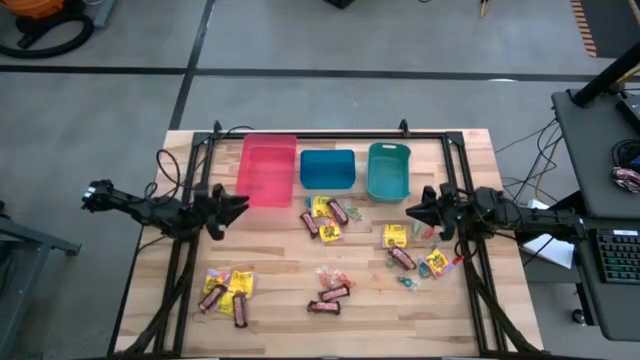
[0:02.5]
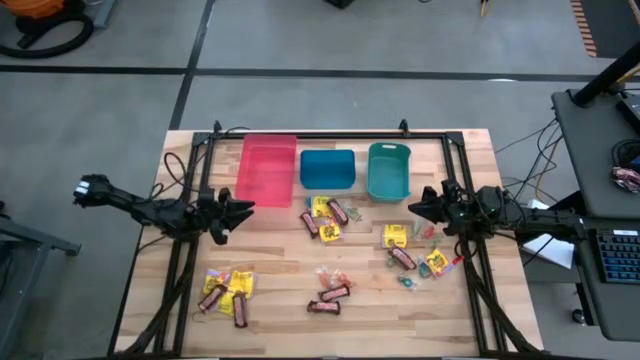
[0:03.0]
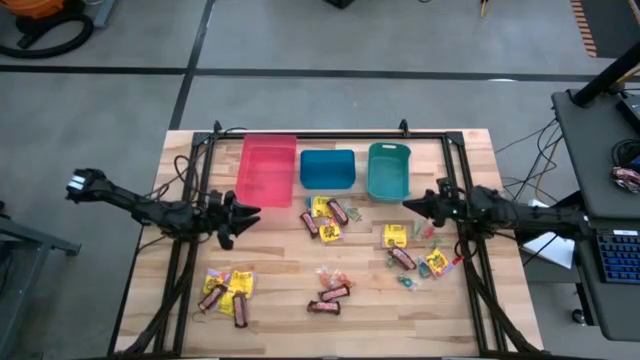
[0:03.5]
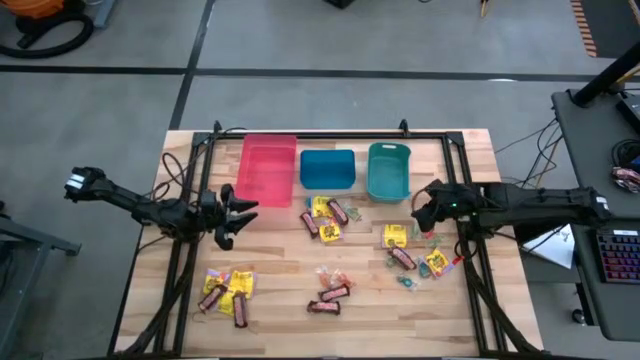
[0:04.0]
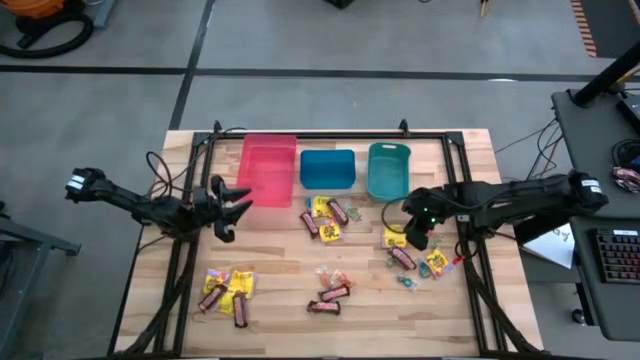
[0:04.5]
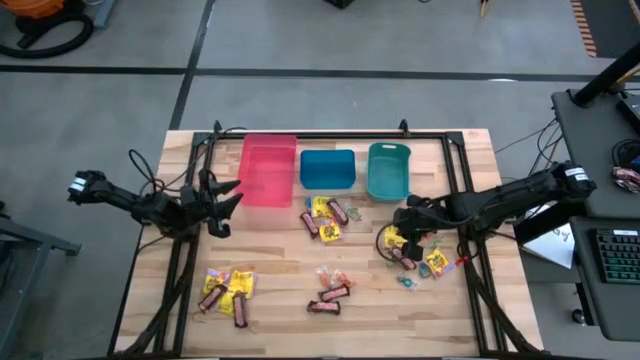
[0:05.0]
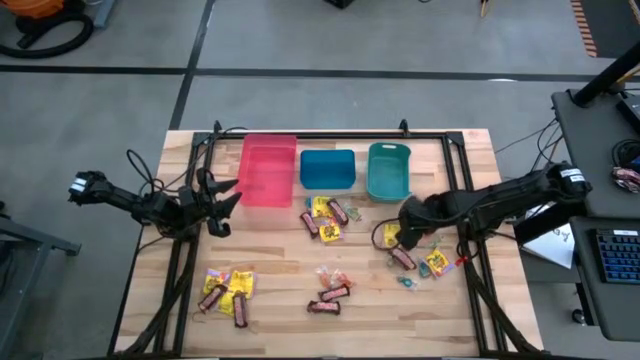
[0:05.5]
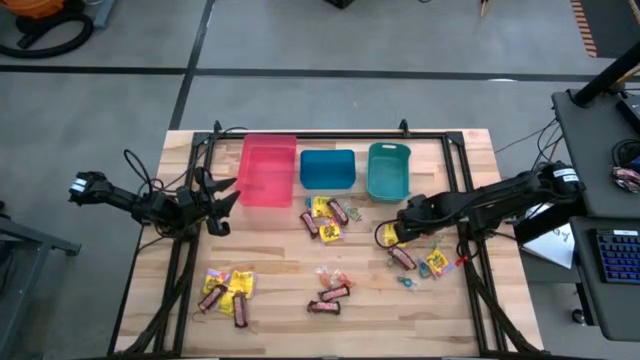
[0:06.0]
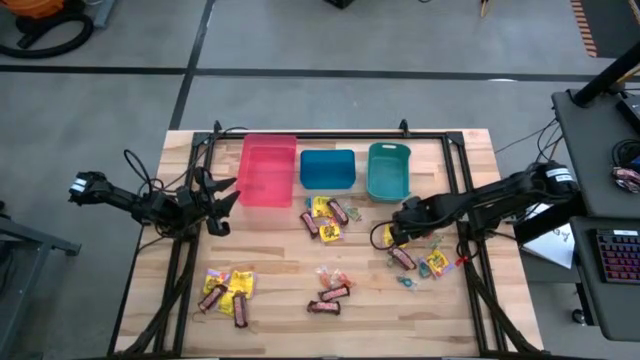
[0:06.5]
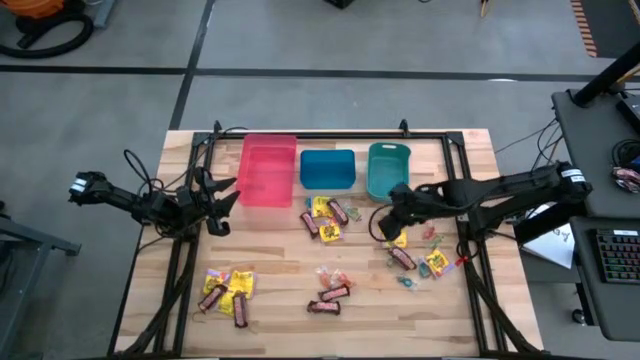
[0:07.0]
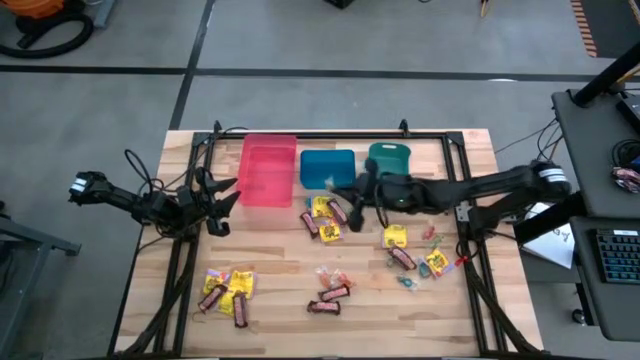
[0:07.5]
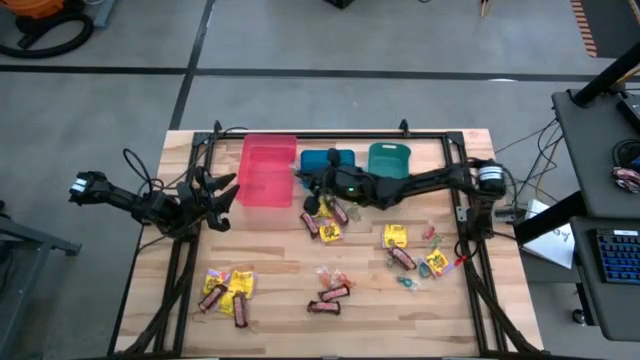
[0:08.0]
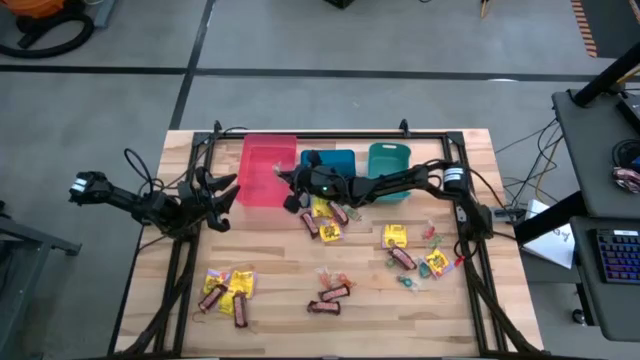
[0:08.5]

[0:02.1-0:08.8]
Task: Sort candy
Put the green candy into the red bin

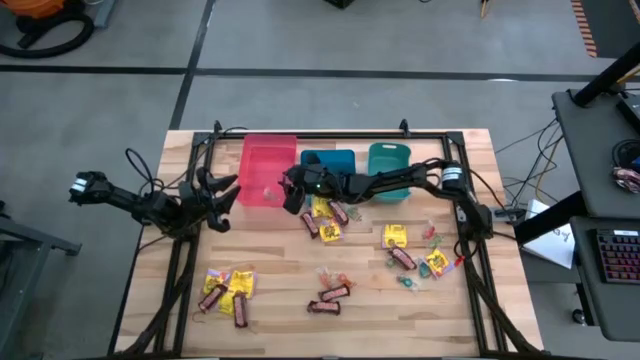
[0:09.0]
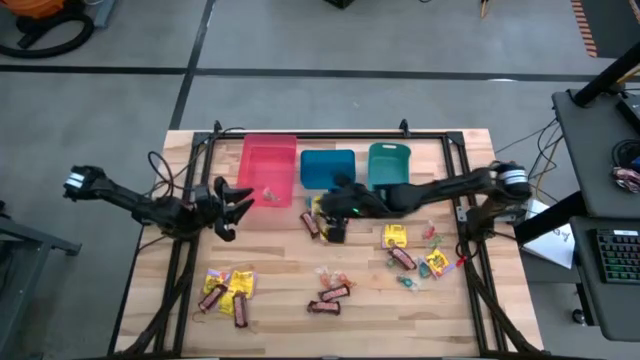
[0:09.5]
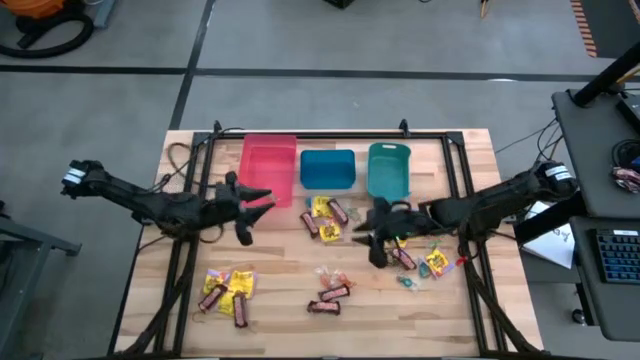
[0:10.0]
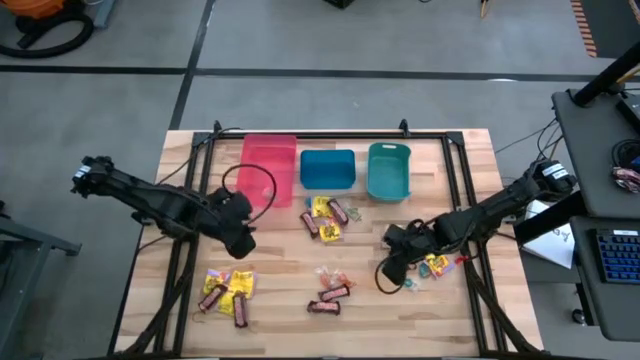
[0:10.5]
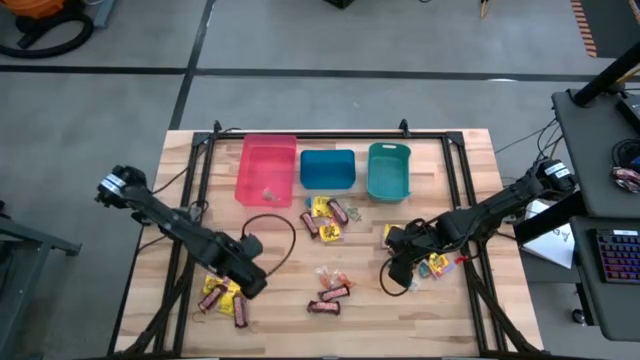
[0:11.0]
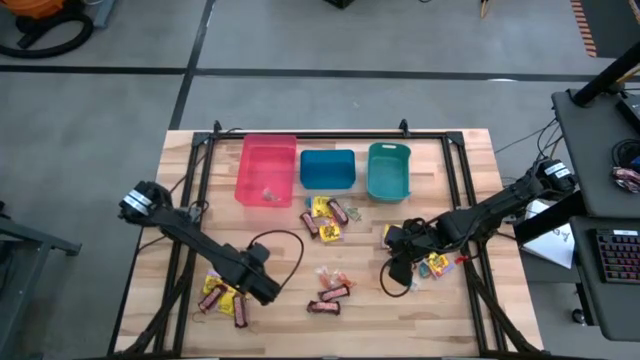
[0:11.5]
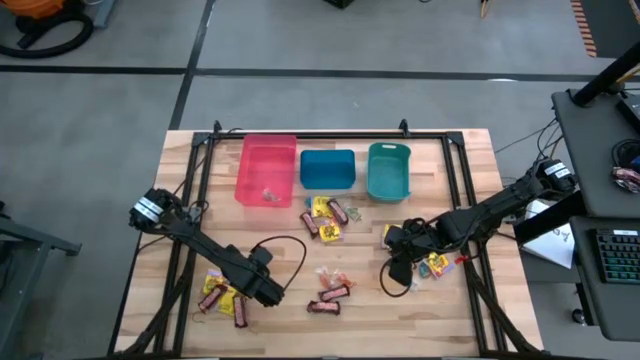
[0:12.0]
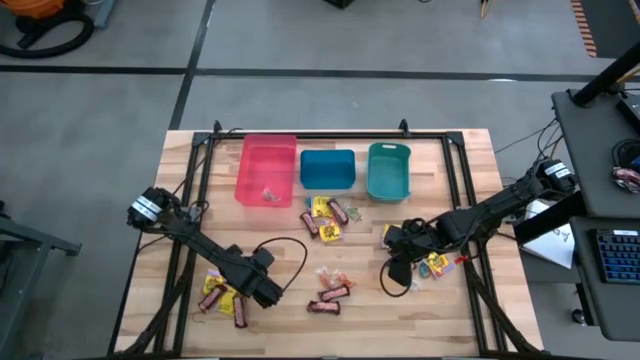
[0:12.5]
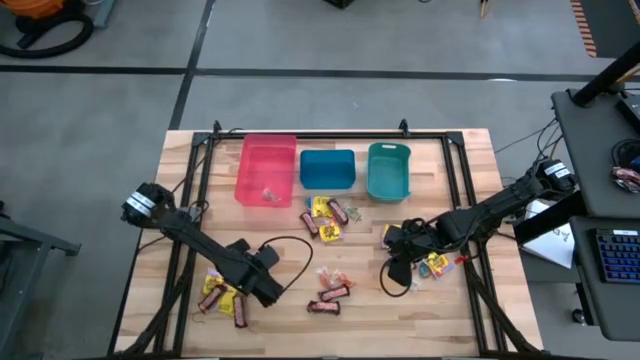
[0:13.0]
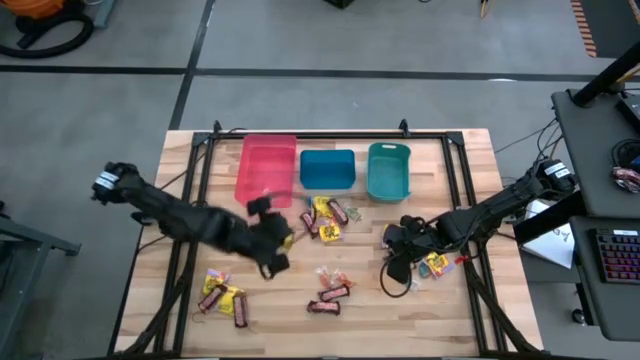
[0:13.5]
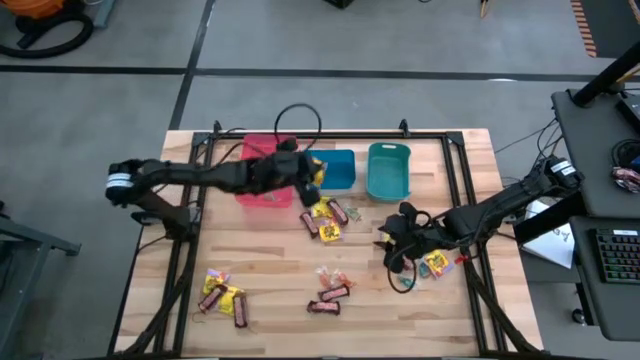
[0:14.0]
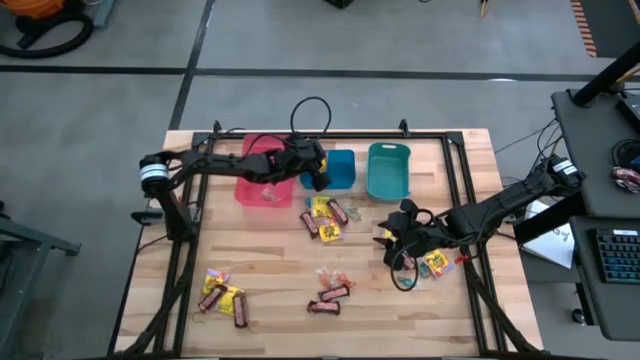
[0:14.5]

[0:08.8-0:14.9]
Put the yellow candy into the blue bin

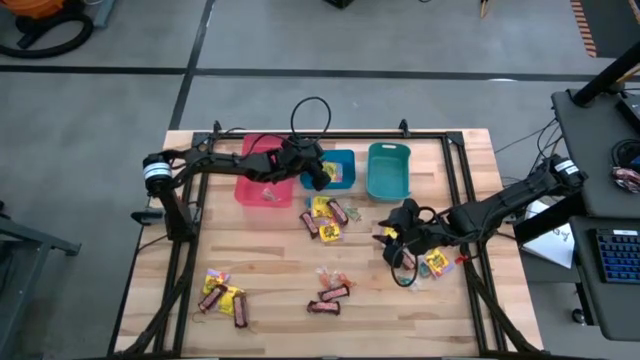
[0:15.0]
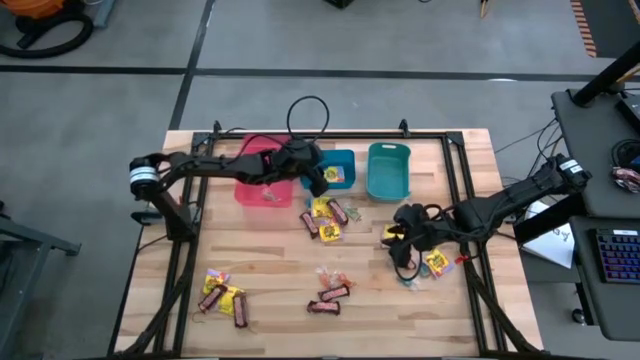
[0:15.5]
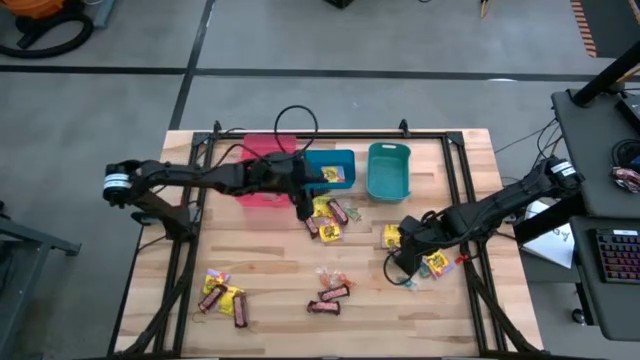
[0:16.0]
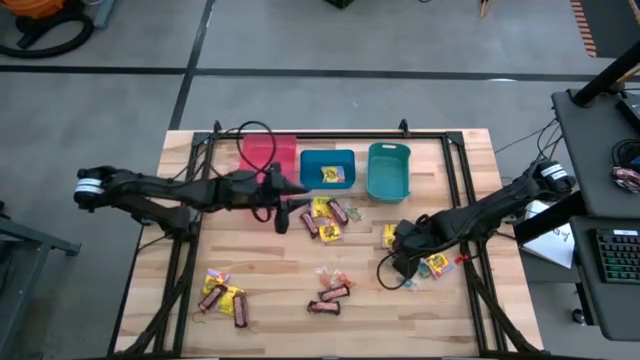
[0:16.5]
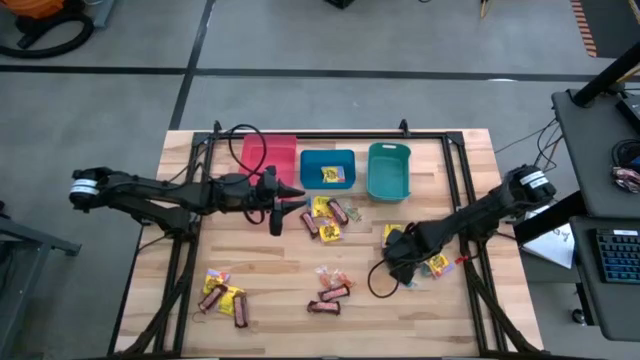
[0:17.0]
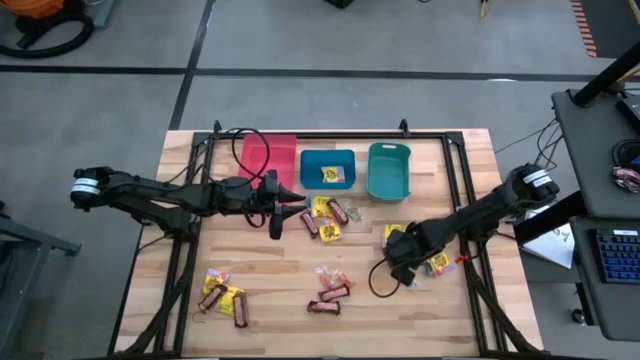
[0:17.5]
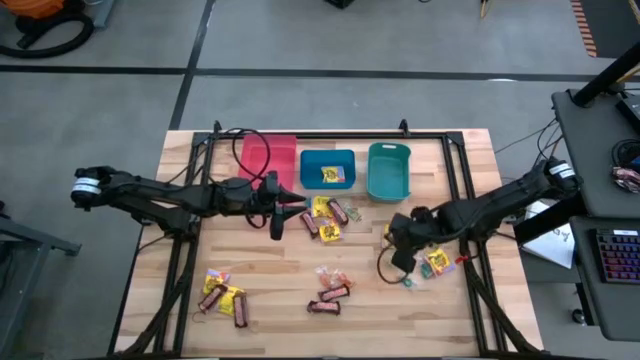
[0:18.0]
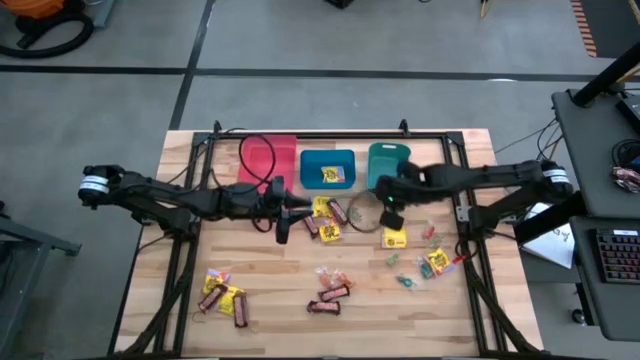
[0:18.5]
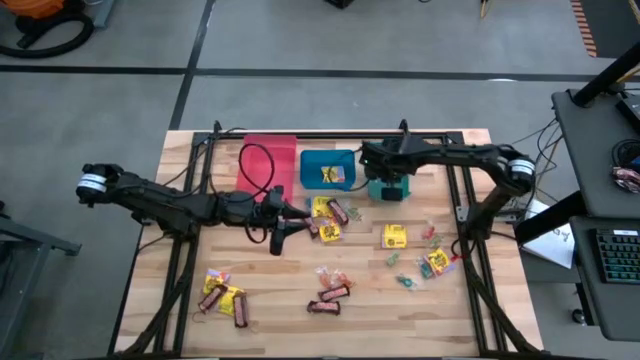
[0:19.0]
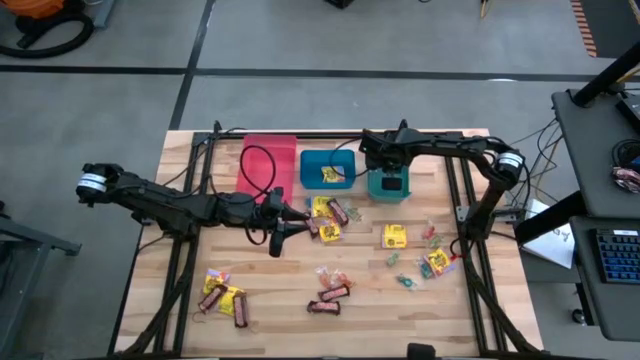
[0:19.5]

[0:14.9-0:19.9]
Put the brown candy into the green bin

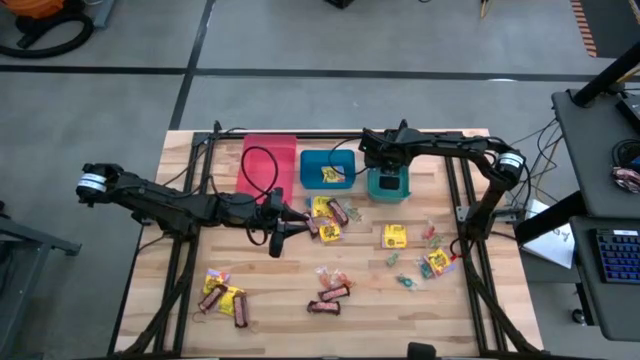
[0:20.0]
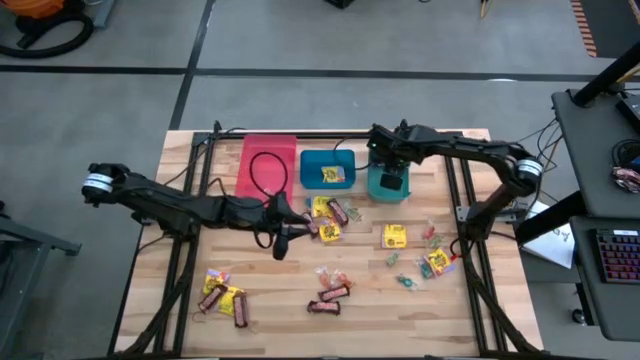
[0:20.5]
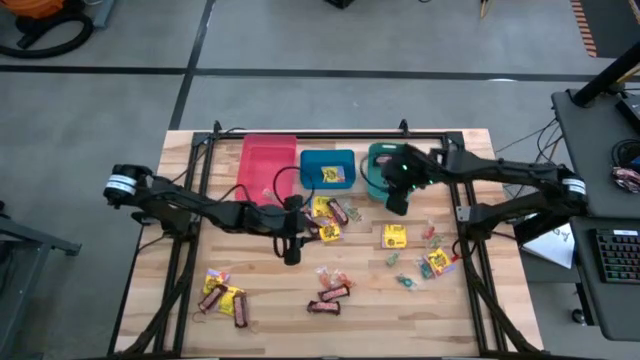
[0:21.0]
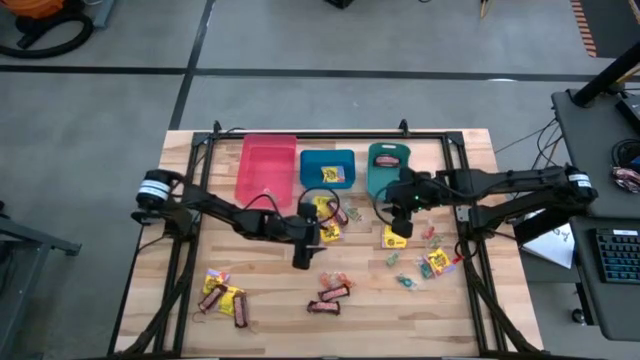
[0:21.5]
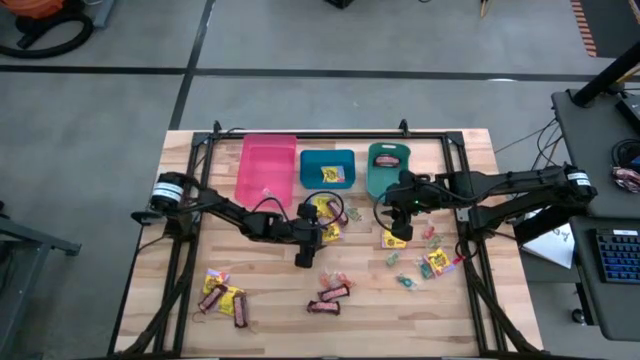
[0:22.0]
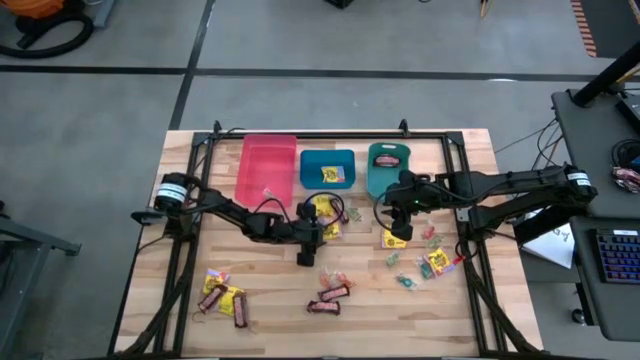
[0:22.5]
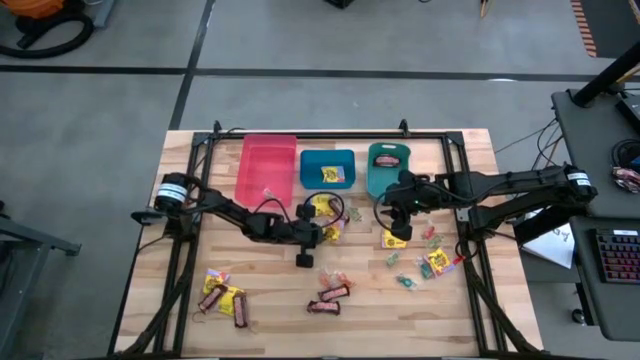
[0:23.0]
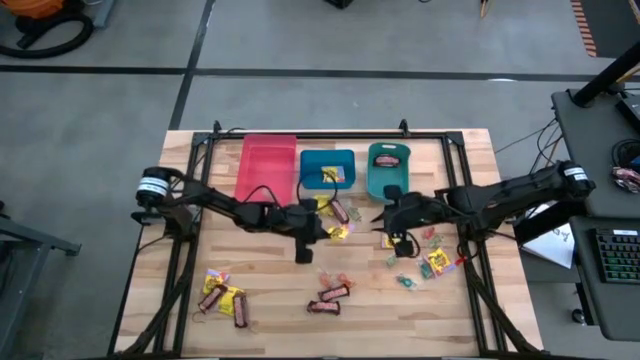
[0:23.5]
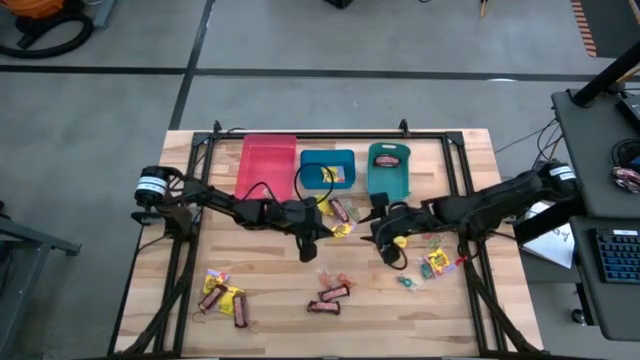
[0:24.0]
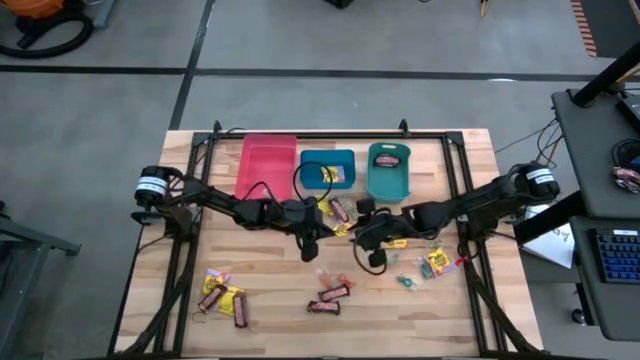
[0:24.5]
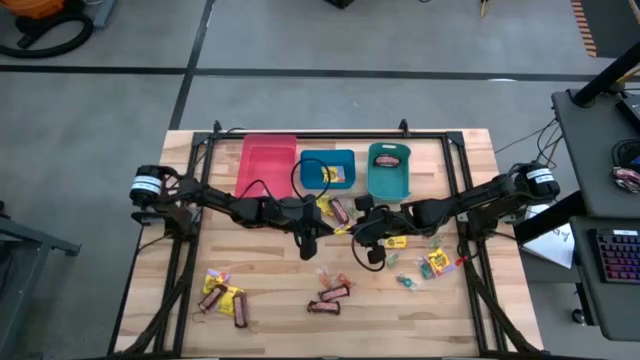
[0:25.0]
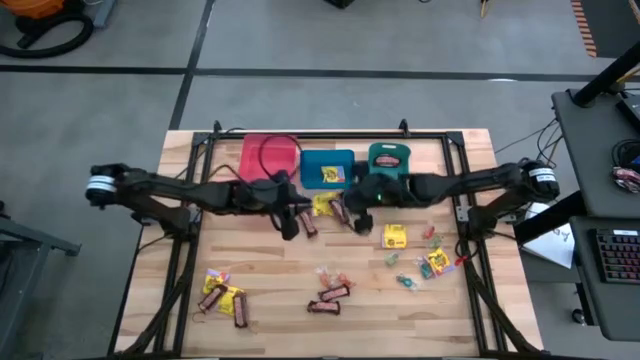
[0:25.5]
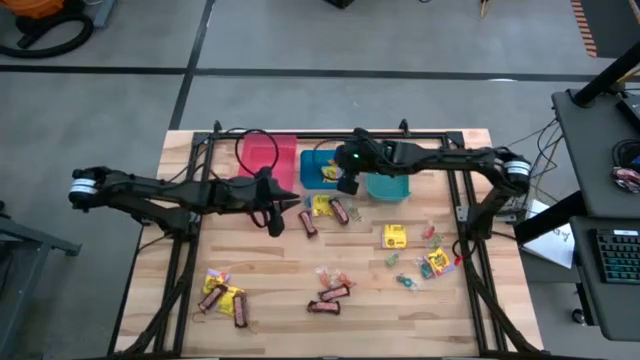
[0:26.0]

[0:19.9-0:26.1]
Put the yellow candy into the blue bin
